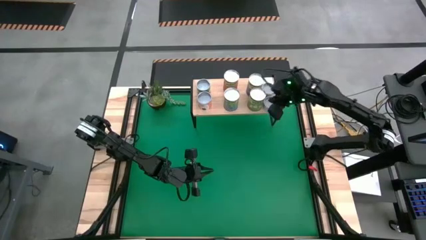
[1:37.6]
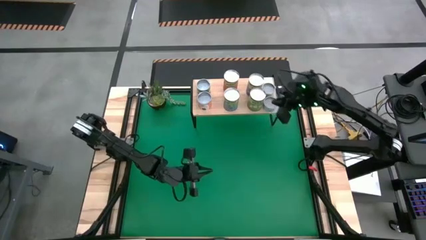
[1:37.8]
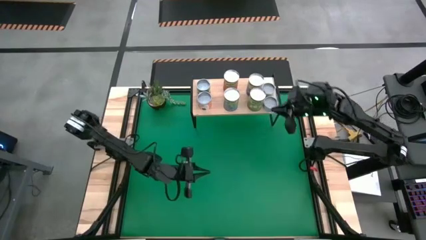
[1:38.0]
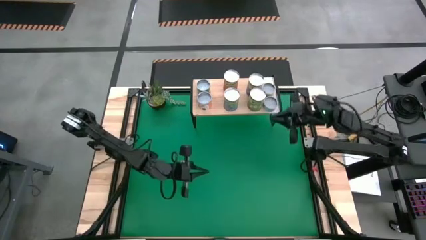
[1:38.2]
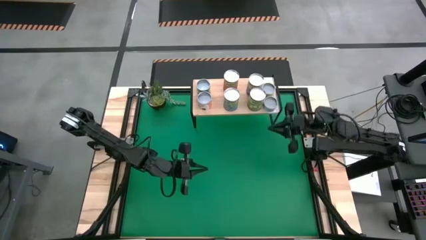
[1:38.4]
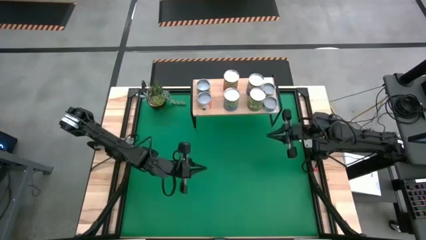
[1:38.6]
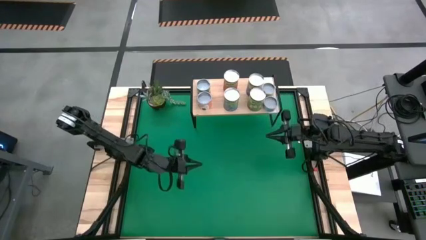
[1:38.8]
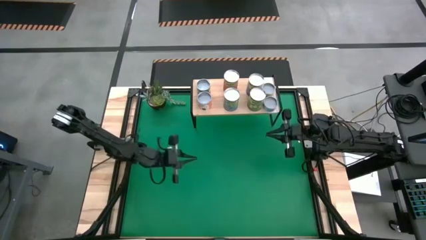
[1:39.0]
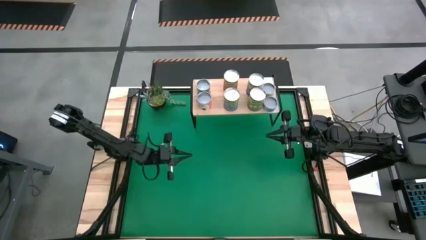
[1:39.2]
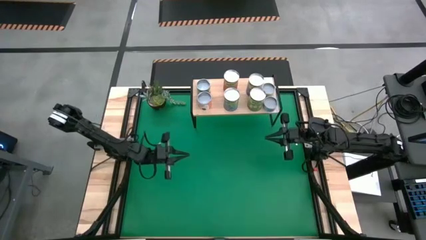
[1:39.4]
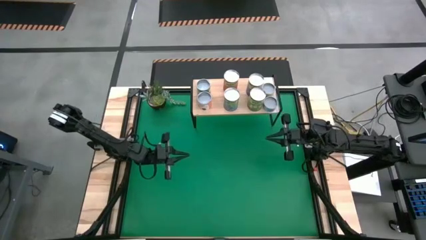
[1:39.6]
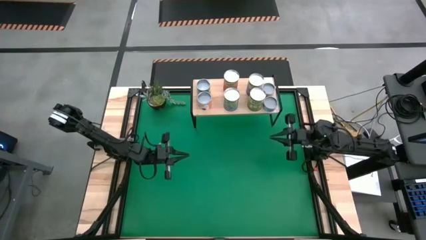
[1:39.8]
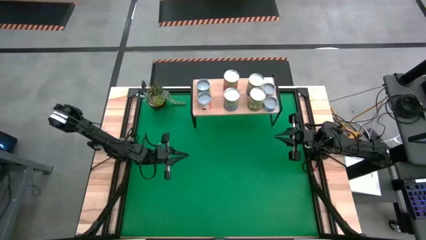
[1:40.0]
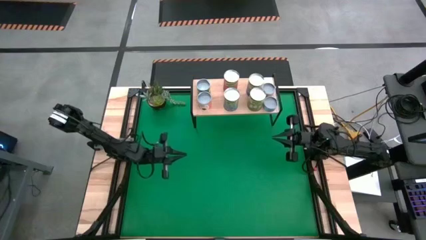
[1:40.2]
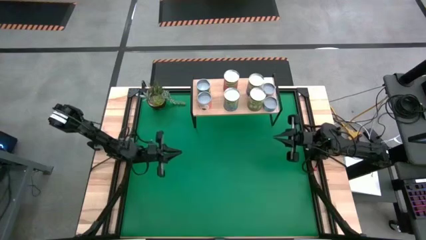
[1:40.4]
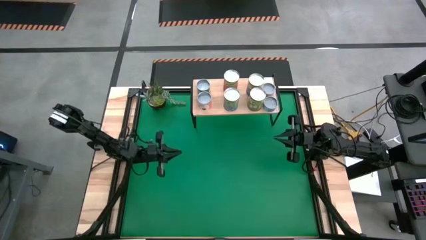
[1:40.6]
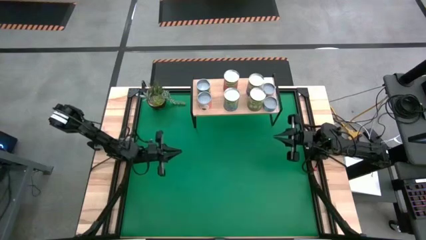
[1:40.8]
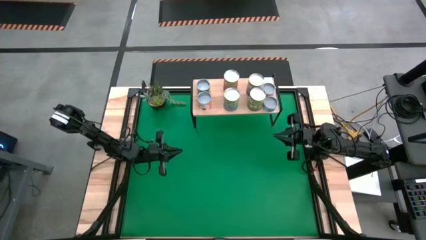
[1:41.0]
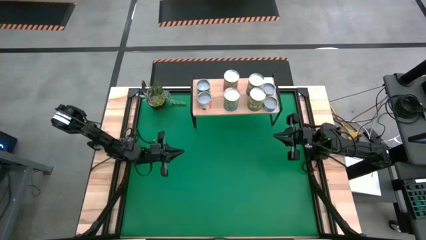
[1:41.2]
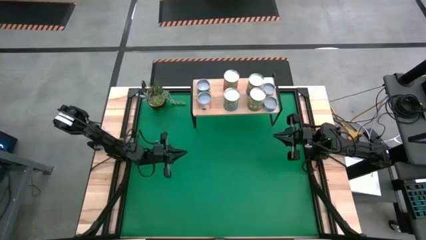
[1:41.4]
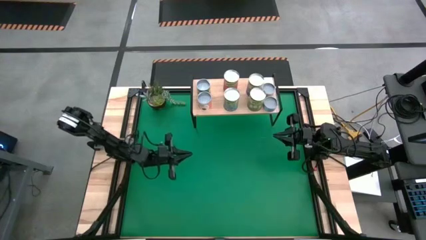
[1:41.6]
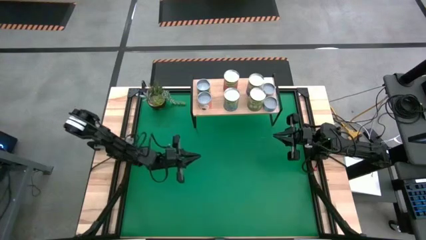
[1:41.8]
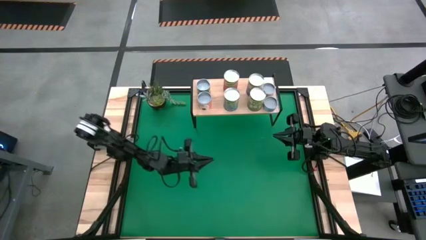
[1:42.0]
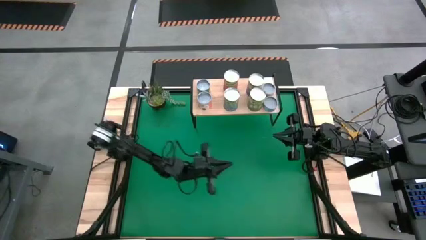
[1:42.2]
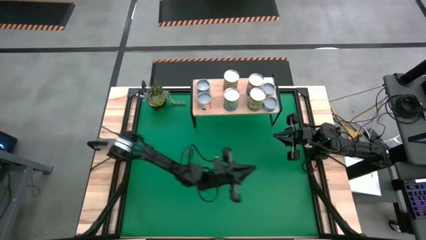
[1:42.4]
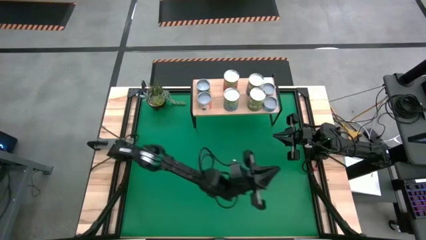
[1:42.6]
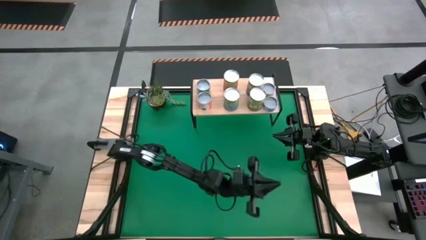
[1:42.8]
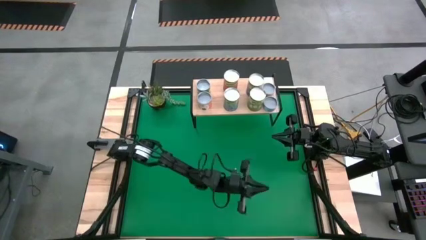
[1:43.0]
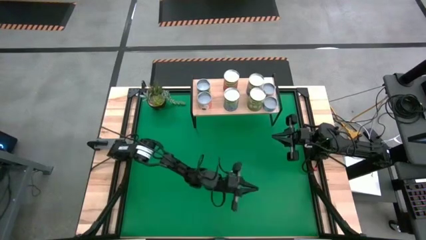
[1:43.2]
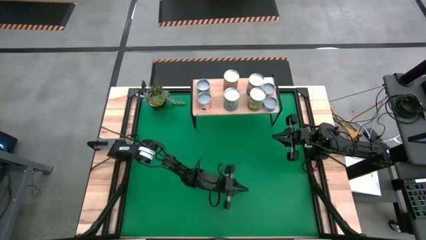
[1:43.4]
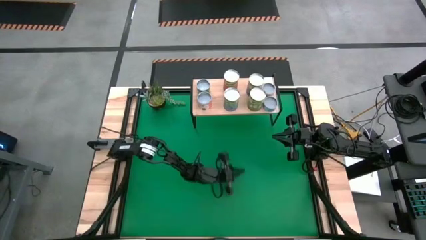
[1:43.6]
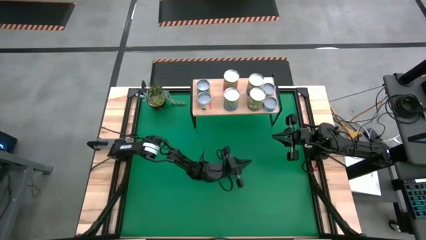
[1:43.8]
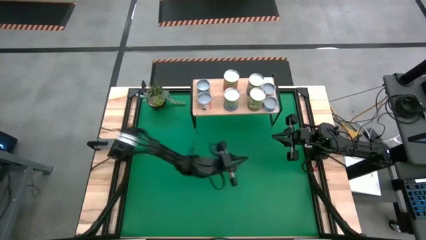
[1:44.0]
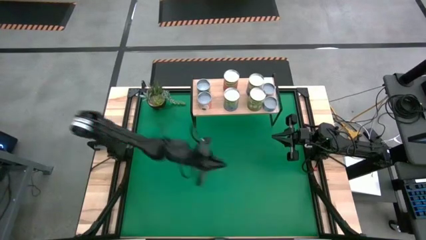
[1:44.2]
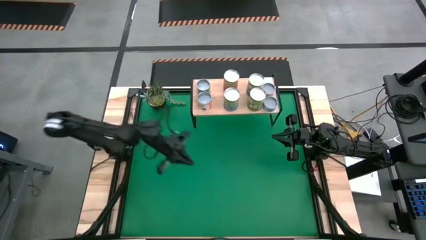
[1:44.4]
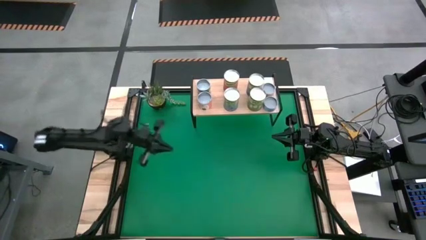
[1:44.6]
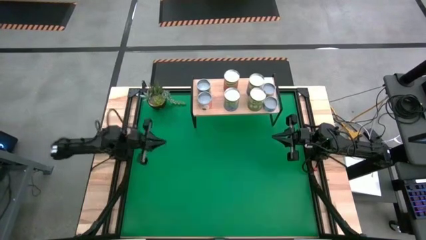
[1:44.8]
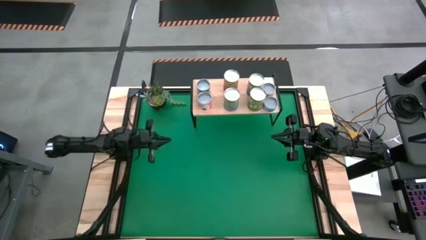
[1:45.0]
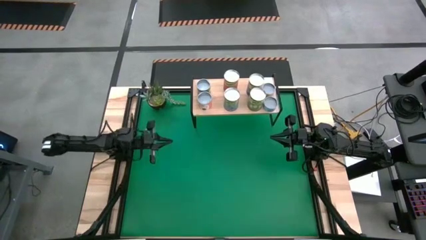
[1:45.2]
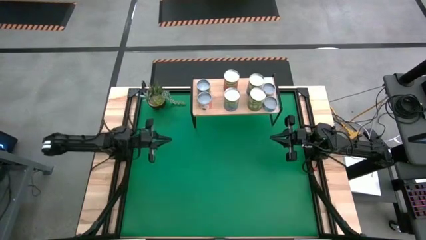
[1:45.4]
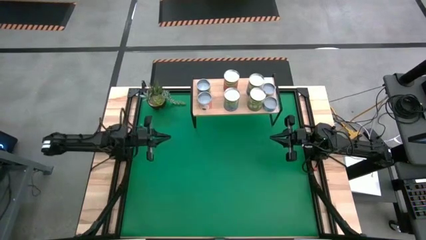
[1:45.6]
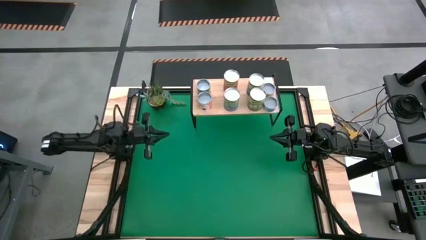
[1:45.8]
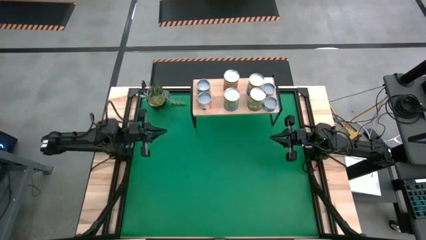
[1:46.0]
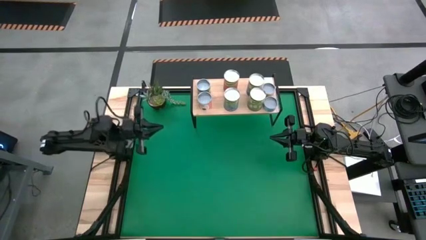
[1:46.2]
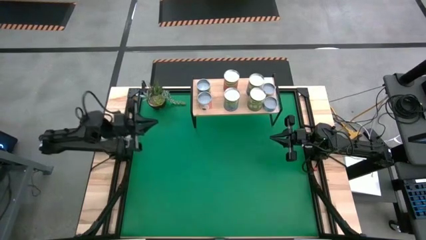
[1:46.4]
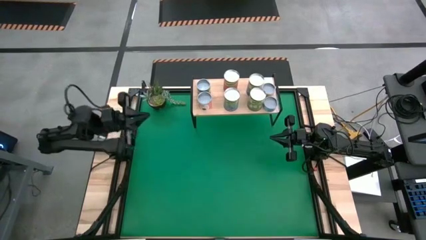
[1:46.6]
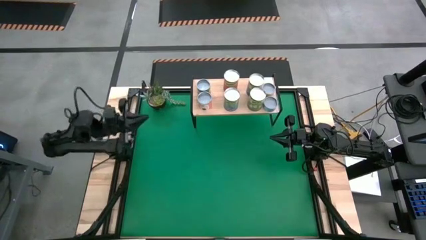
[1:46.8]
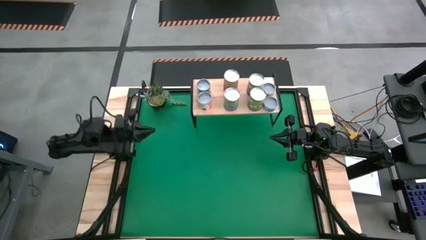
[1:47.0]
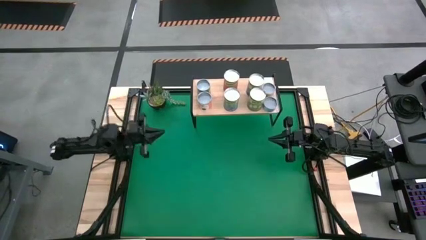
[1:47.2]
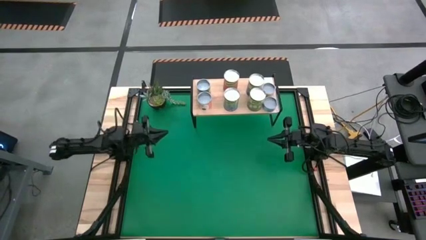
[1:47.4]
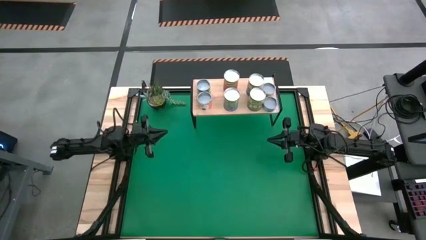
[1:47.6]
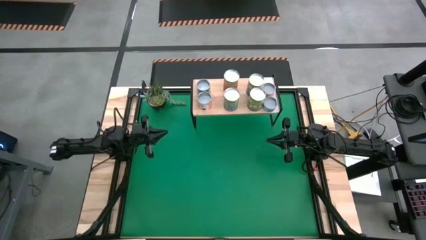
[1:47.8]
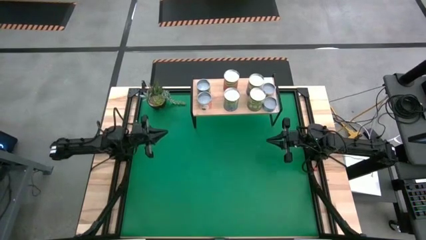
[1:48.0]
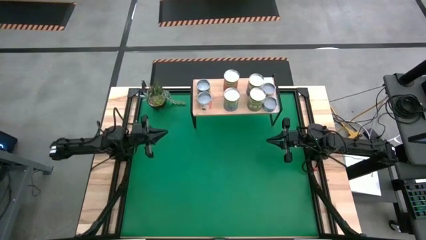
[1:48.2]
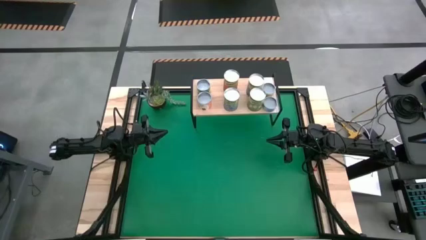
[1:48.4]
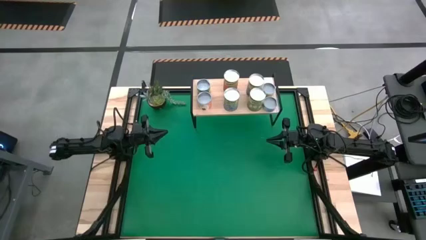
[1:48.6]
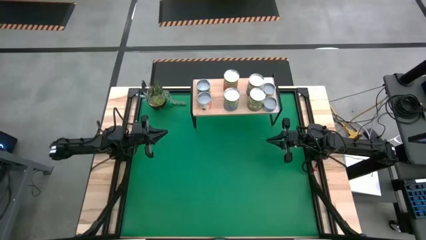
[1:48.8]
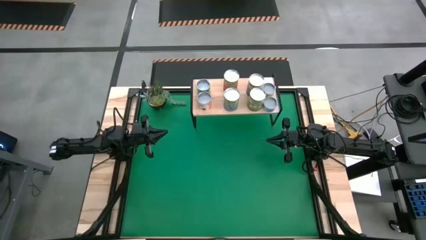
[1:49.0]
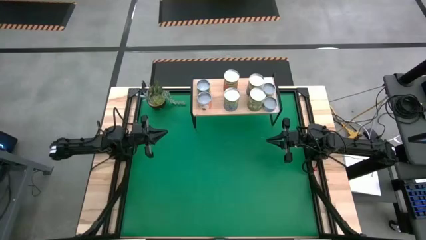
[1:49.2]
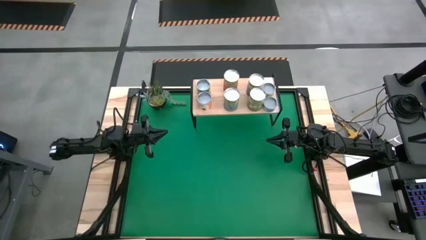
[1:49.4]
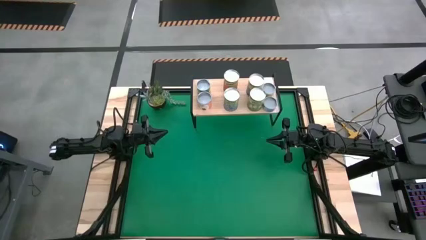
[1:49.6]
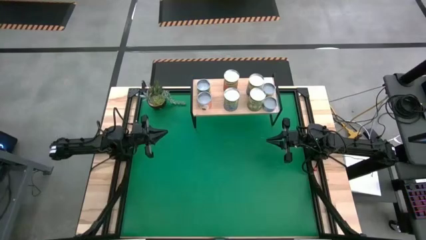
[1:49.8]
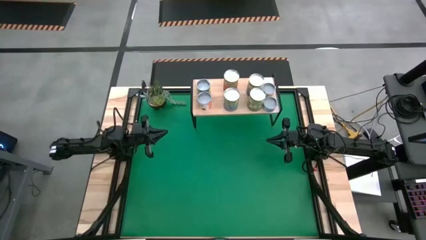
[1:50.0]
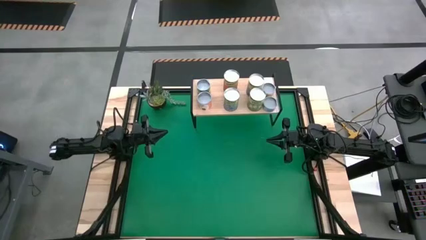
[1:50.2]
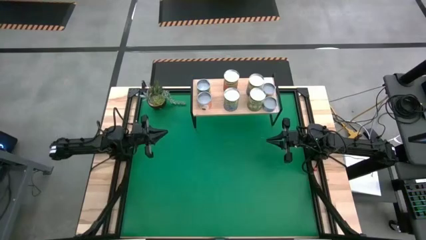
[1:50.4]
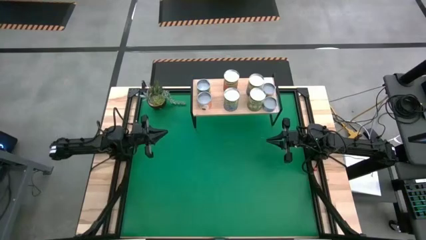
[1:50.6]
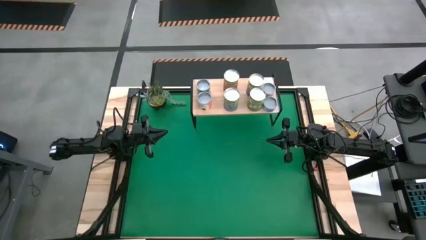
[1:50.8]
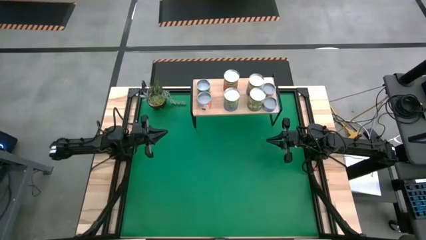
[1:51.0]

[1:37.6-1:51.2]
Task: Pick and place cans onto a shelf
Return to Home Position

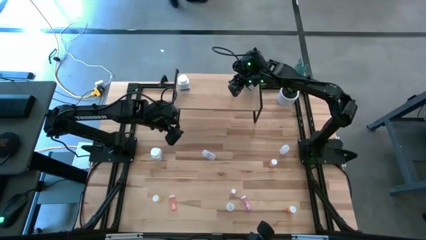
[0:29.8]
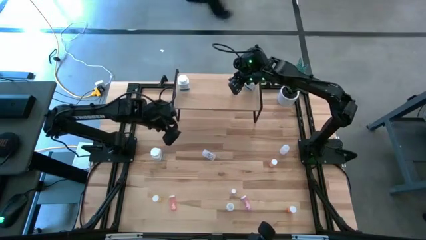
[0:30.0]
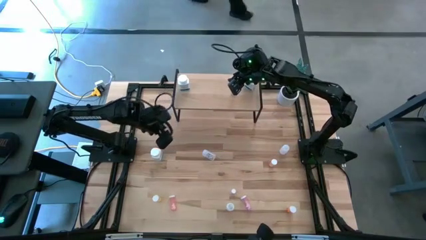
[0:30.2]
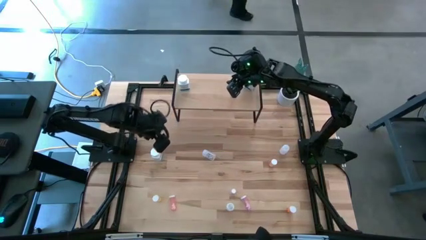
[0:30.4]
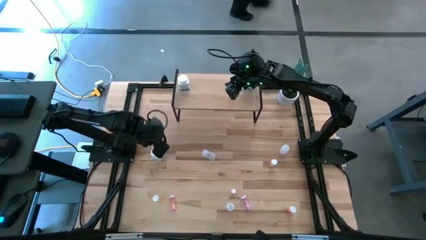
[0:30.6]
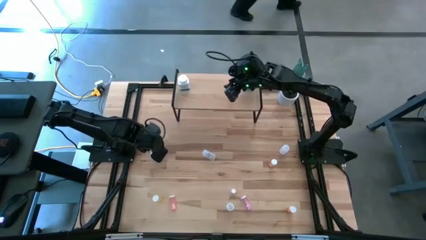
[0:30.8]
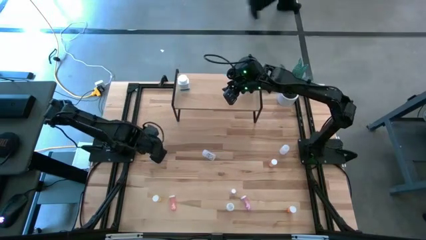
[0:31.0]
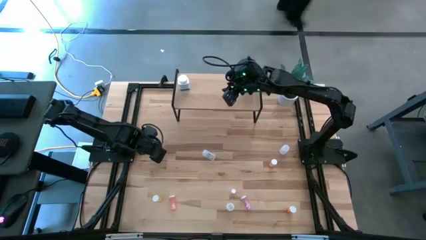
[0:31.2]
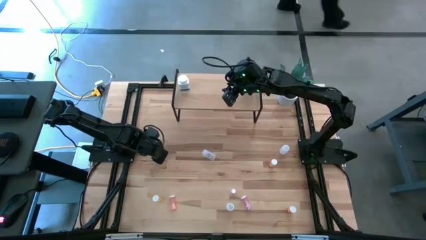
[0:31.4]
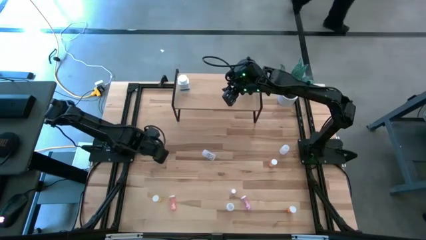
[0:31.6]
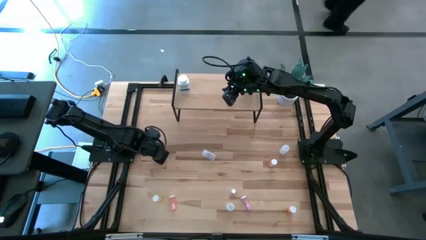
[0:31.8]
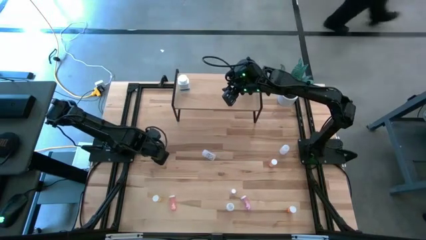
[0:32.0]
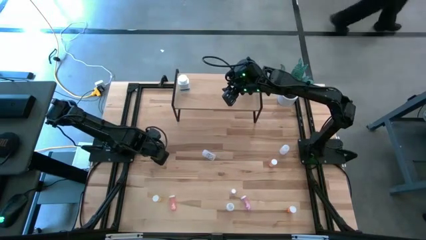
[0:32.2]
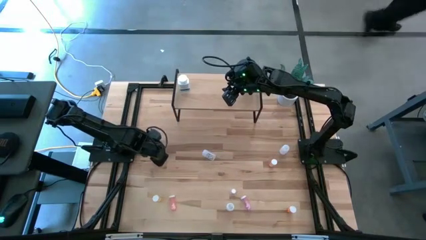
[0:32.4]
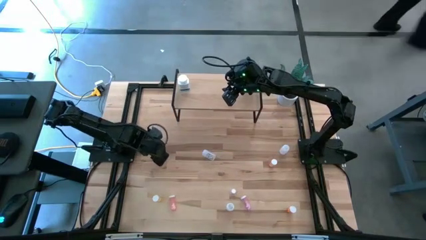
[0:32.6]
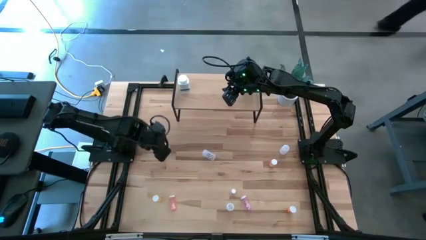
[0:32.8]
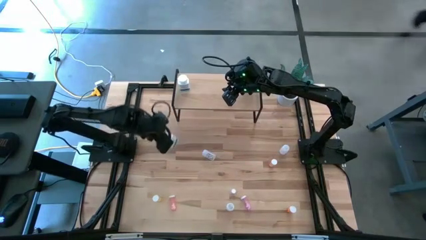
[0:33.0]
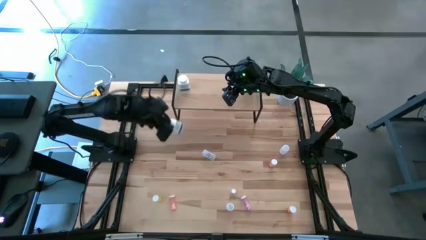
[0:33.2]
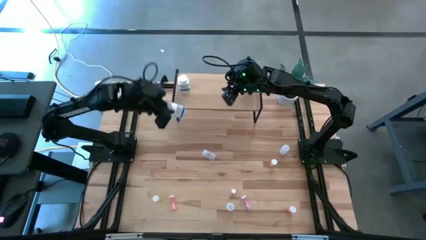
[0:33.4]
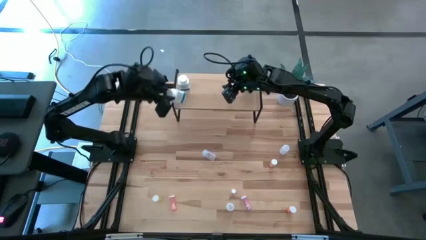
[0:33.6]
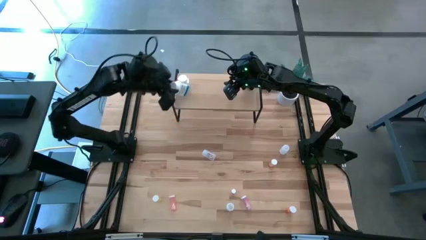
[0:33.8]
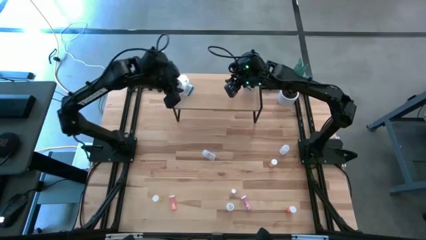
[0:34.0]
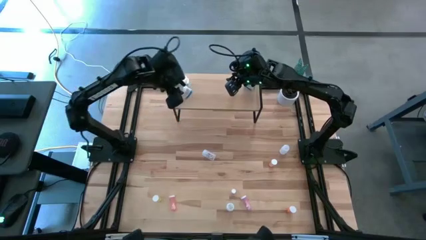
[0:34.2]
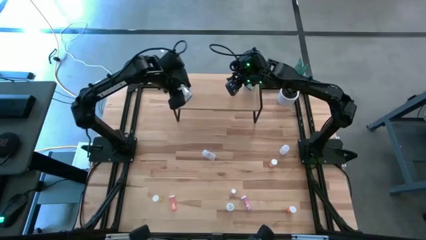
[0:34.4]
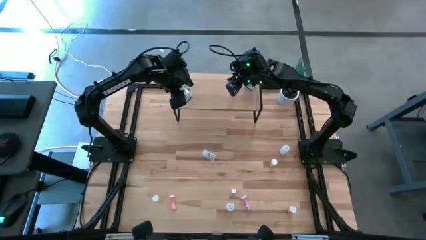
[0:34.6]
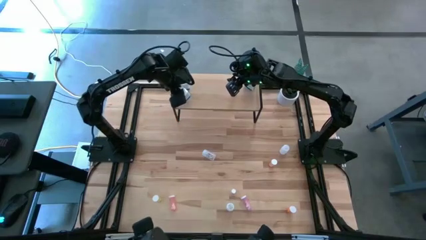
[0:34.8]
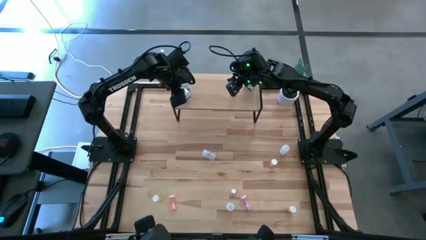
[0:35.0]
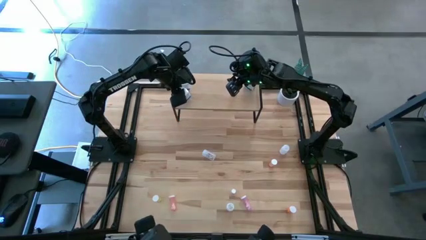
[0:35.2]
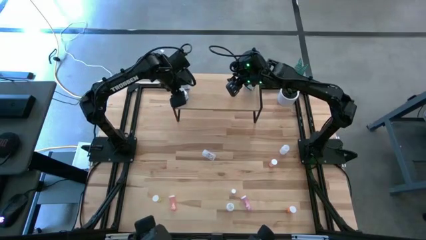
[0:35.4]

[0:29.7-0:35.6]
Task: Pick and place medicine bottles onto shelf by color
Put the white and blue pill bottle on the shelf
